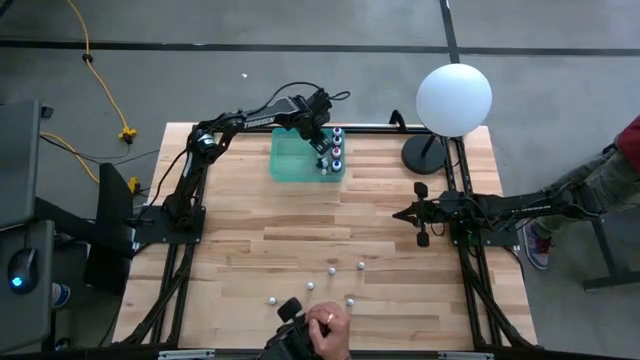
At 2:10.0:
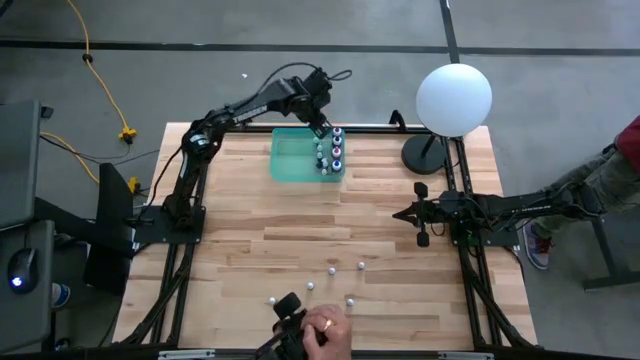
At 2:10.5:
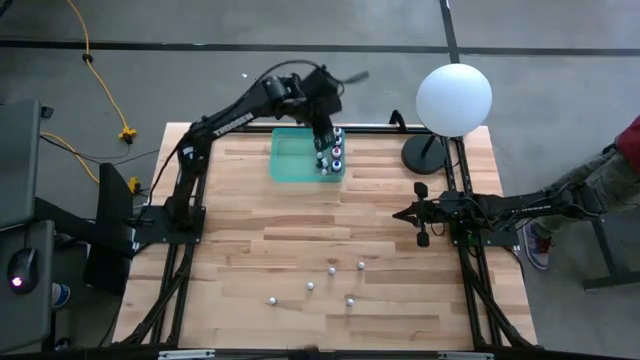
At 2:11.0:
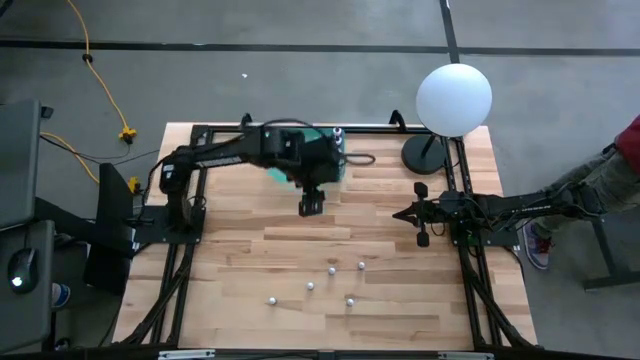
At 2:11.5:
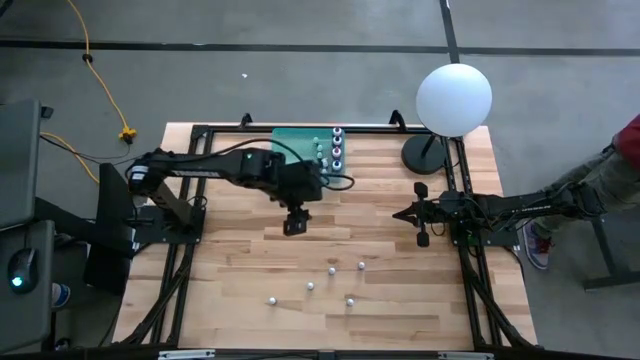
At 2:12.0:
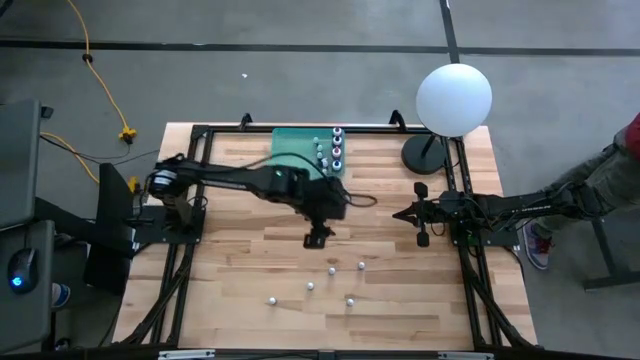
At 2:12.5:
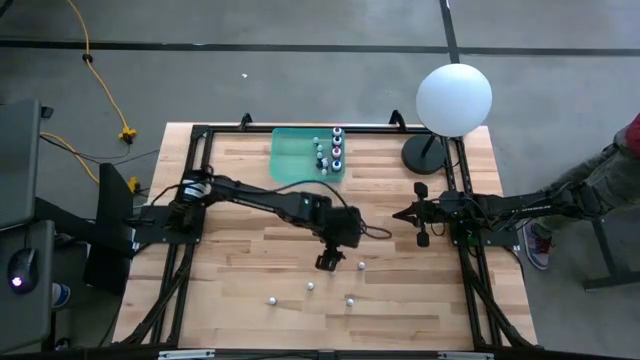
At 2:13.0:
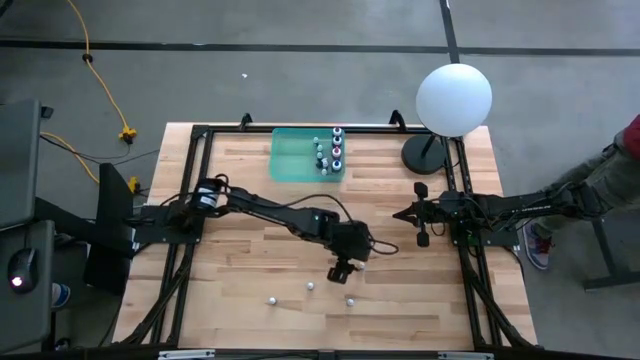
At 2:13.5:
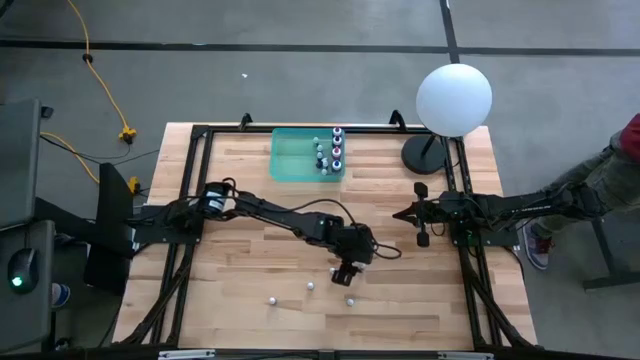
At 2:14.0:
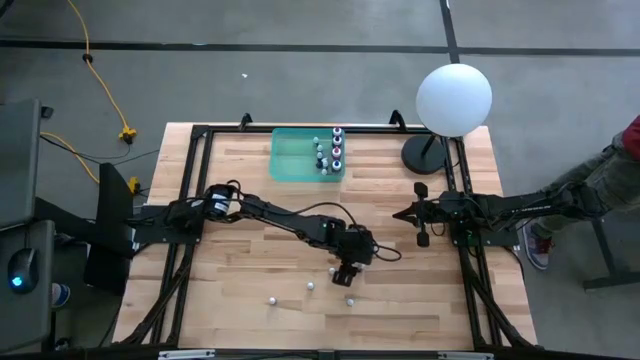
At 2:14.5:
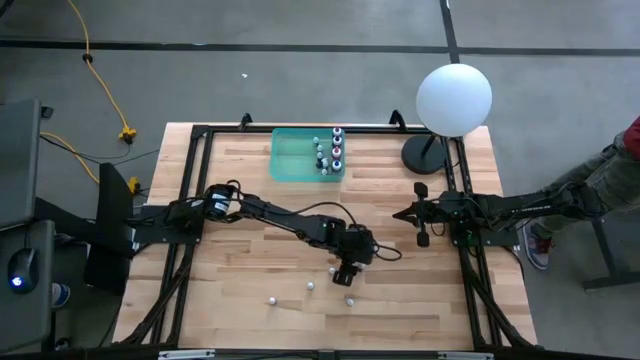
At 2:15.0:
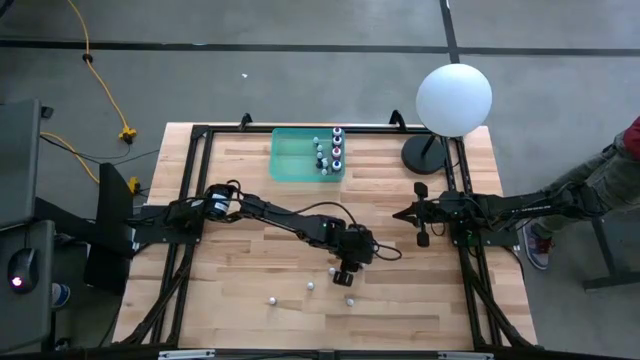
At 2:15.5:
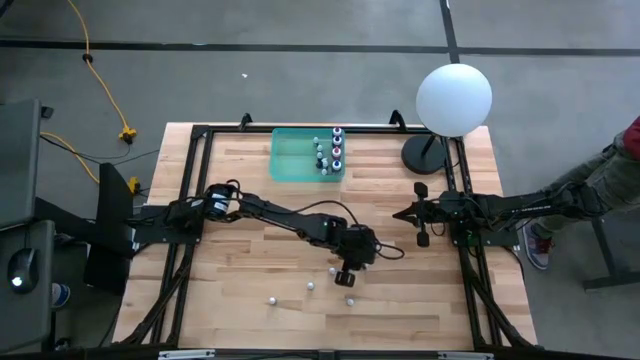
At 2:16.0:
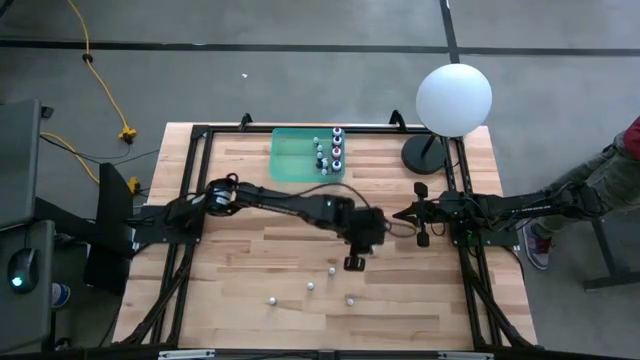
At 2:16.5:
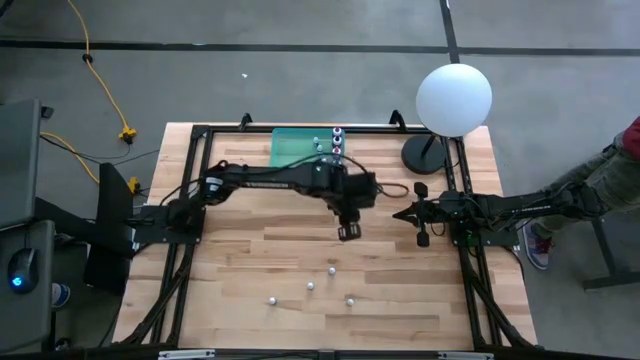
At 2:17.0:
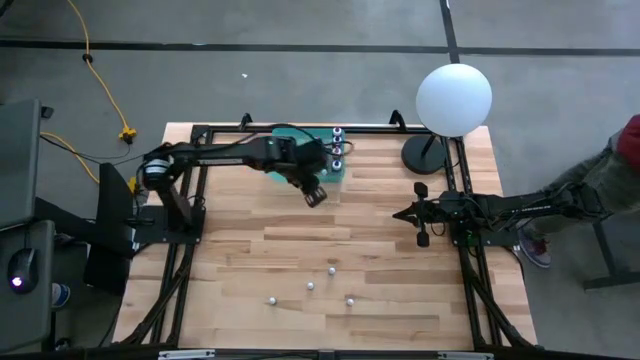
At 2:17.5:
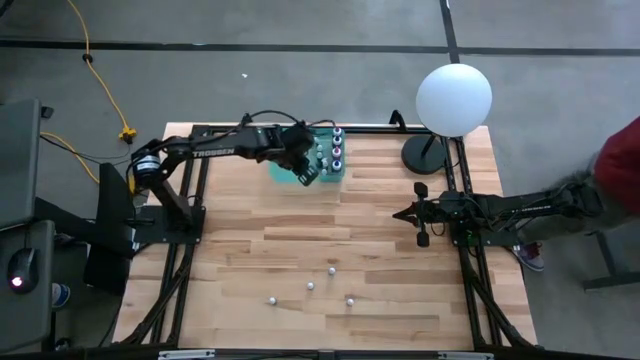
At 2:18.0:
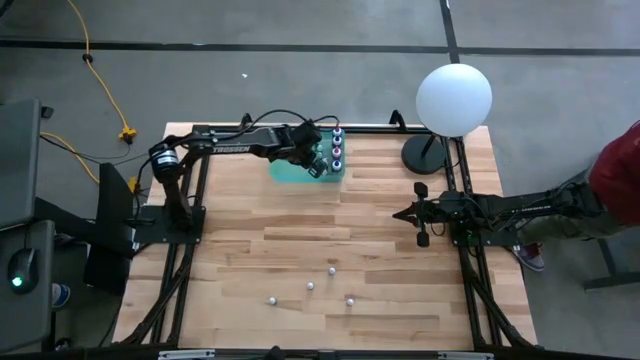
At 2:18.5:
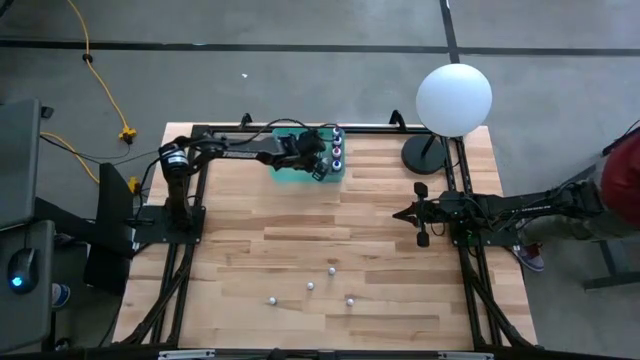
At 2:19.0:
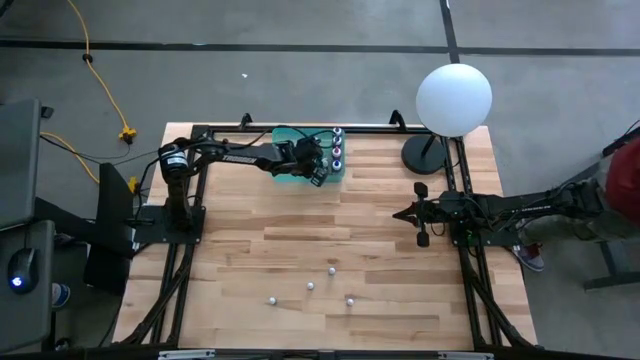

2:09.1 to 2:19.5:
Task: Pick & Place food coloring
Put the small red food coloring bottle into the blue transparent bin

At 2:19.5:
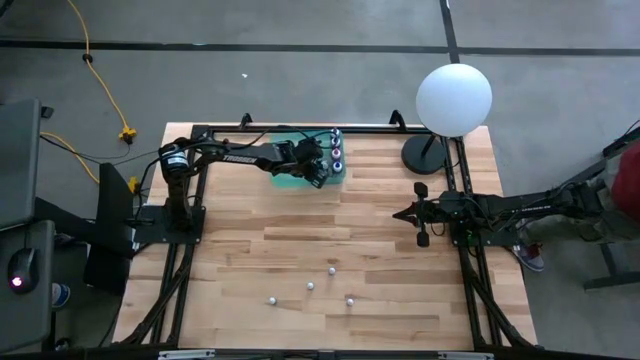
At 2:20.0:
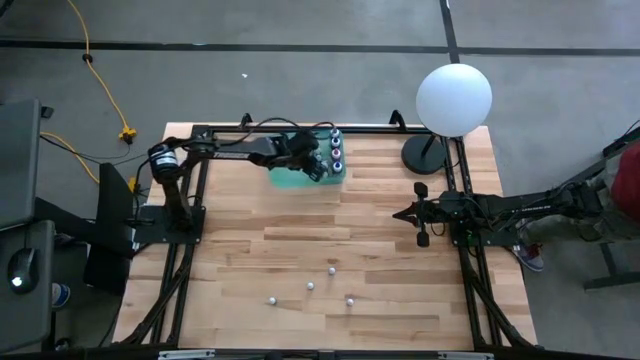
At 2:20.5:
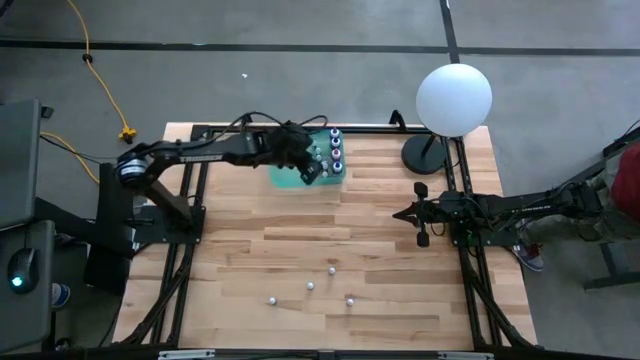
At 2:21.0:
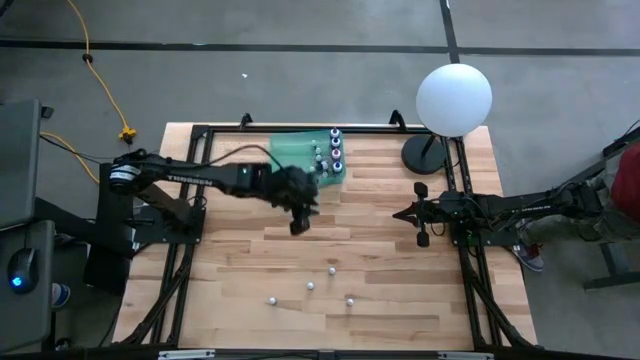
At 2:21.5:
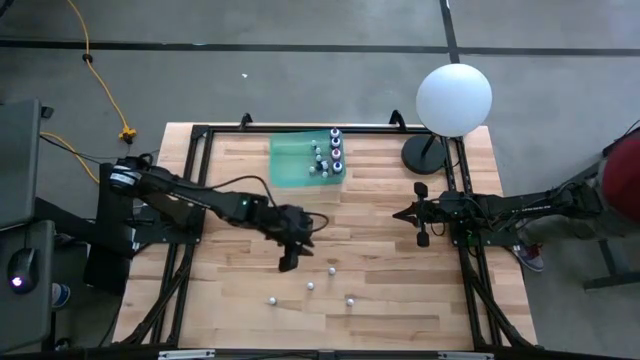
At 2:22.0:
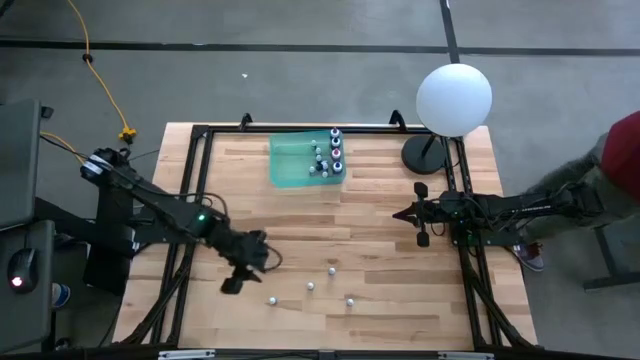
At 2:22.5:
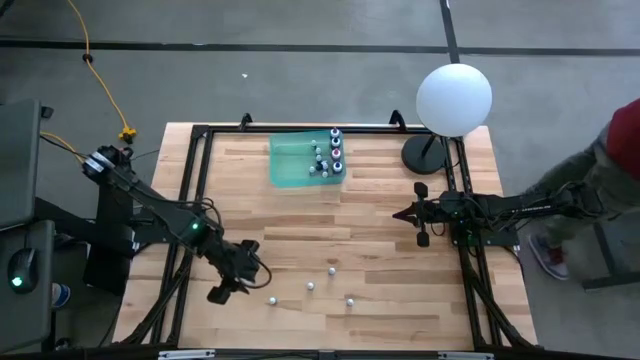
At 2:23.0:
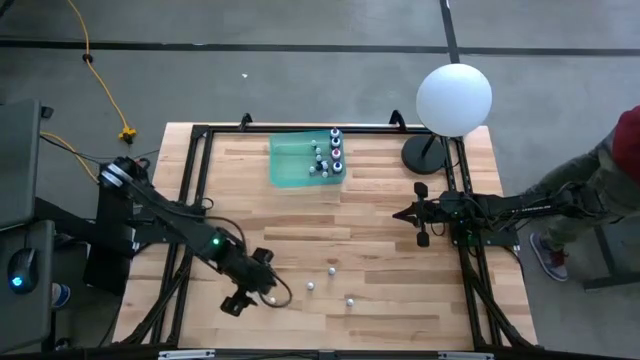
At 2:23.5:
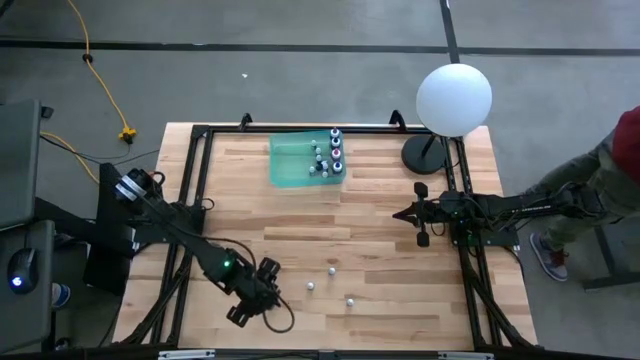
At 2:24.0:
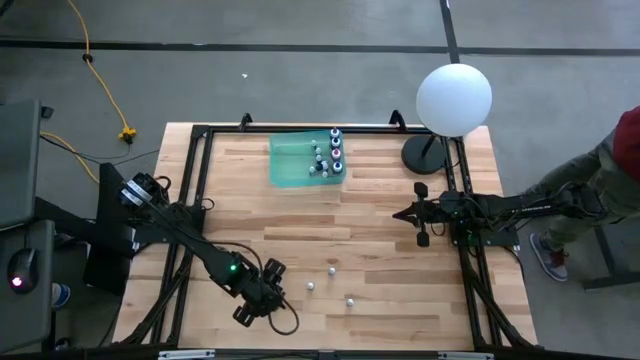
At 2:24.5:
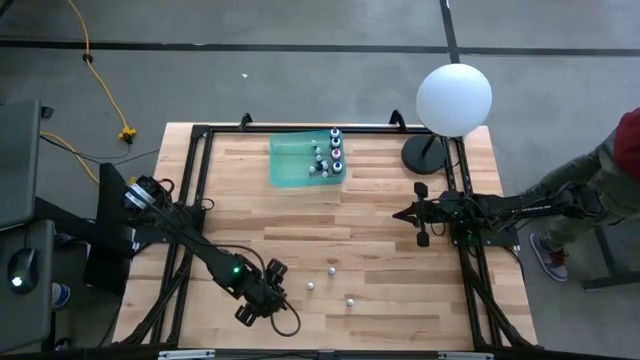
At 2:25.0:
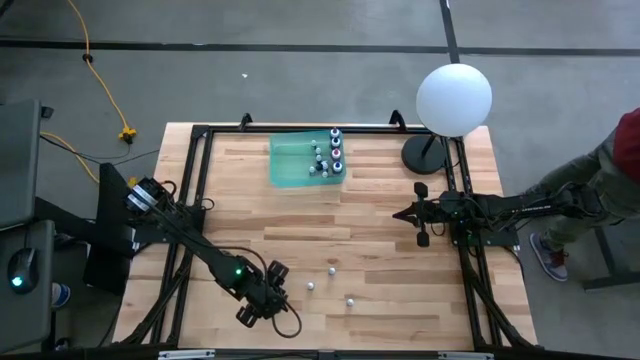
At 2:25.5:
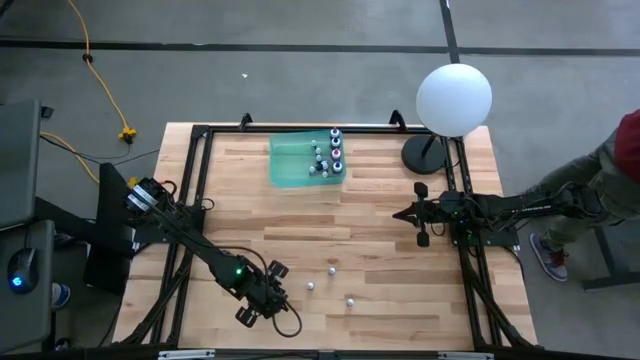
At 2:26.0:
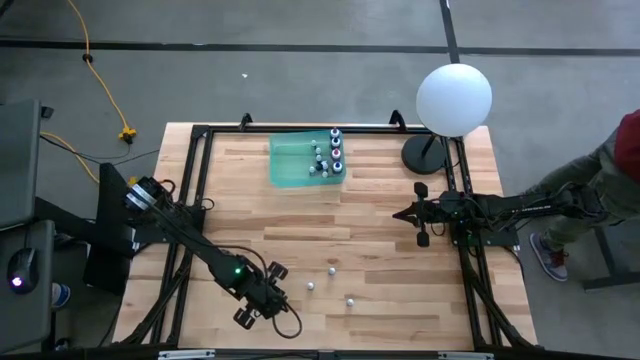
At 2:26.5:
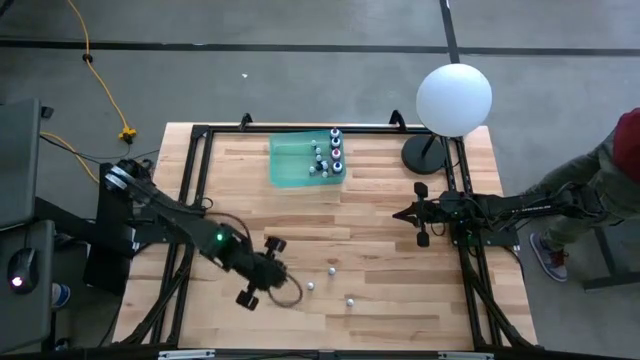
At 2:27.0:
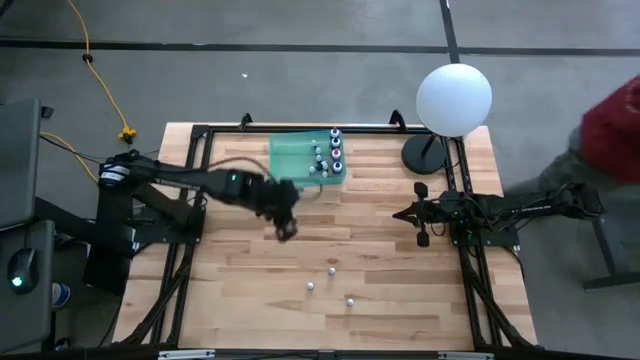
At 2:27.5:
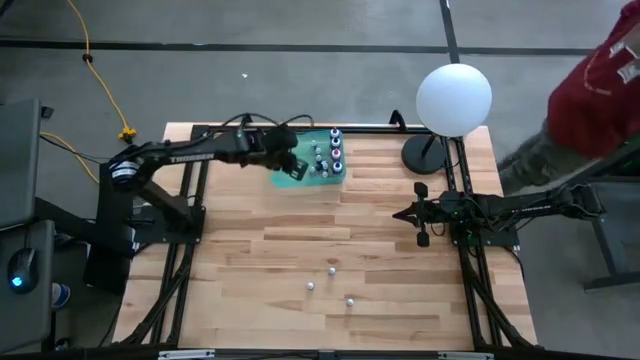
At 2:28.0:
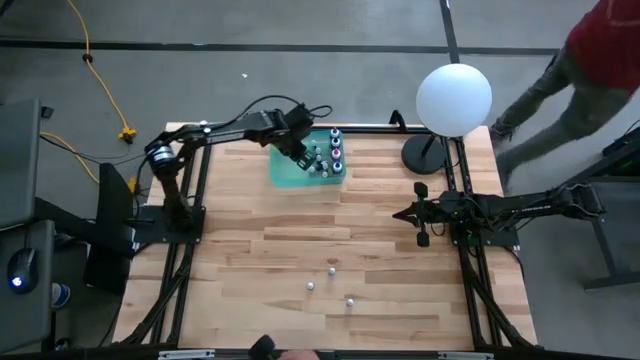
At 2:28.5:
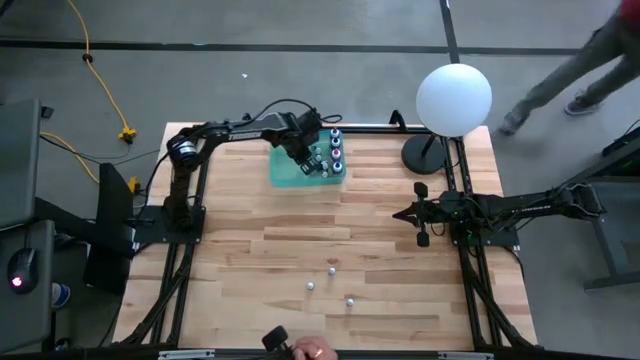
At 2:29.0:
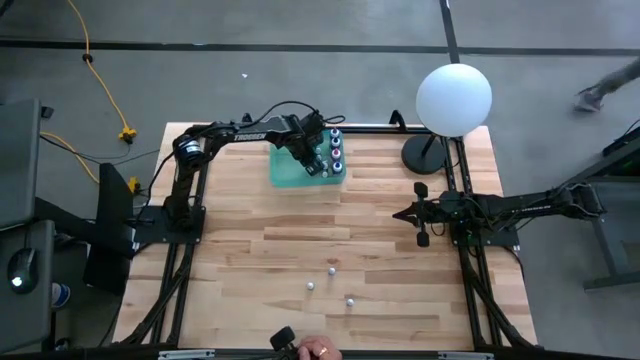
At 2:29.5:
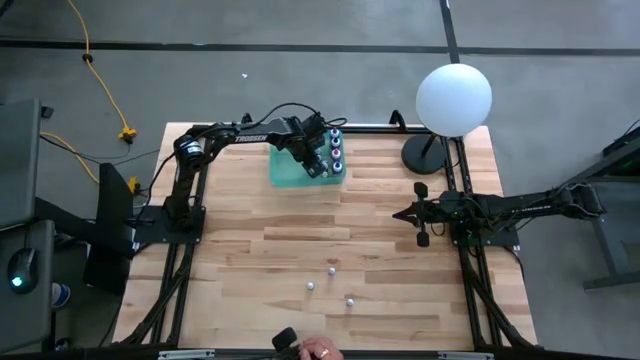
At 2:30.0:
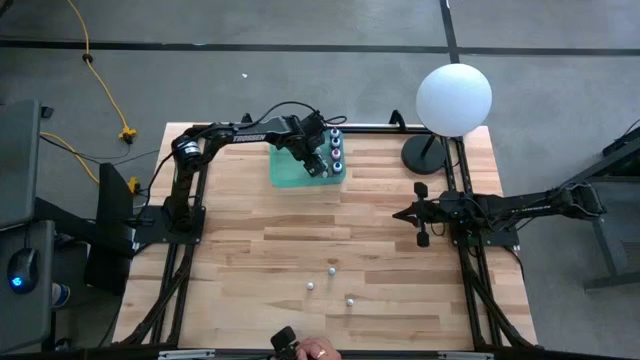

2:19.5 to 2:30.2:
Put the small green food coloring bottle into the blue transparent bin
